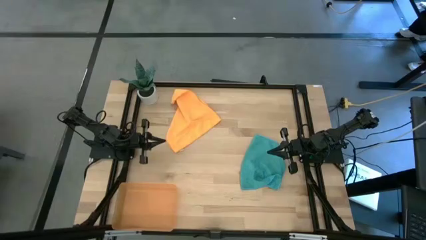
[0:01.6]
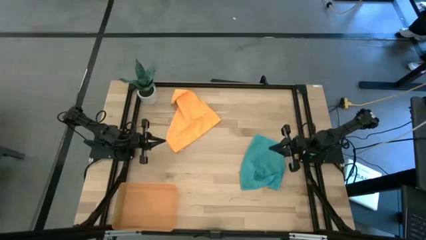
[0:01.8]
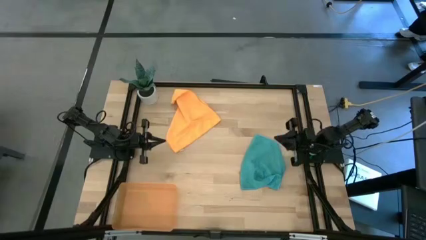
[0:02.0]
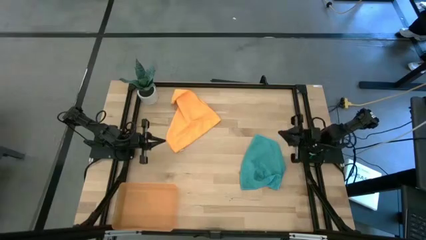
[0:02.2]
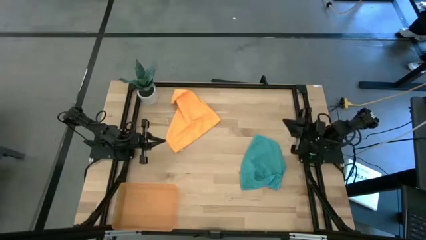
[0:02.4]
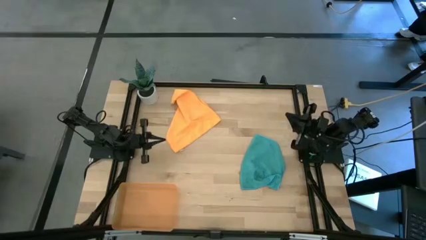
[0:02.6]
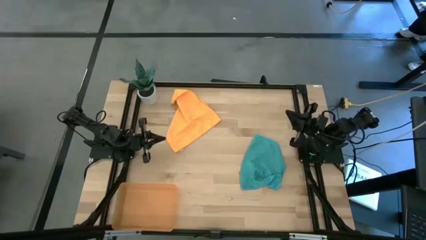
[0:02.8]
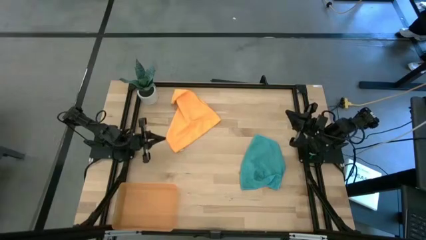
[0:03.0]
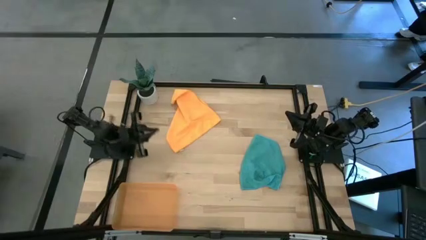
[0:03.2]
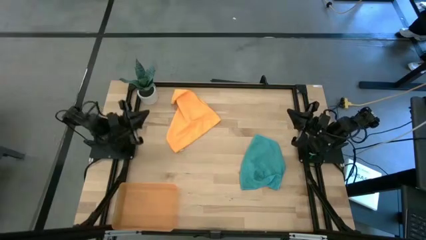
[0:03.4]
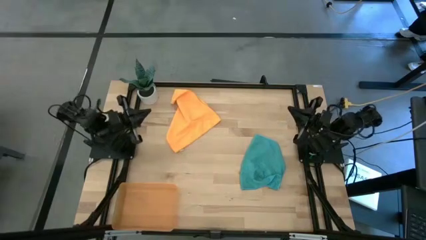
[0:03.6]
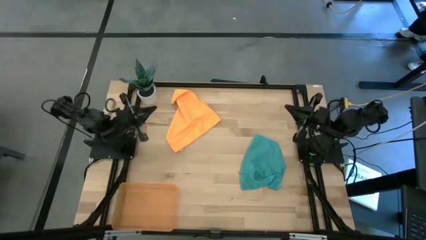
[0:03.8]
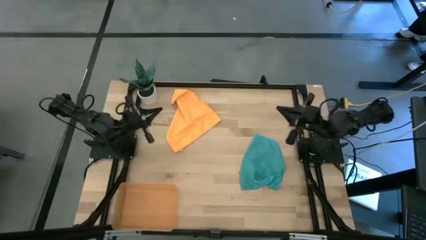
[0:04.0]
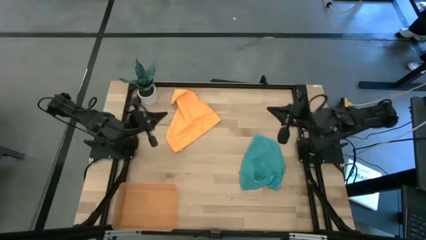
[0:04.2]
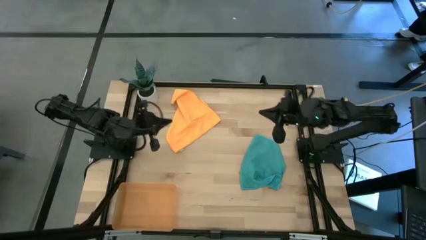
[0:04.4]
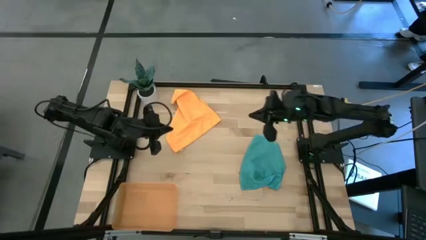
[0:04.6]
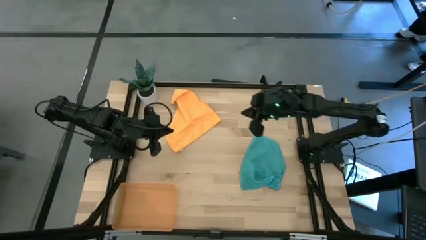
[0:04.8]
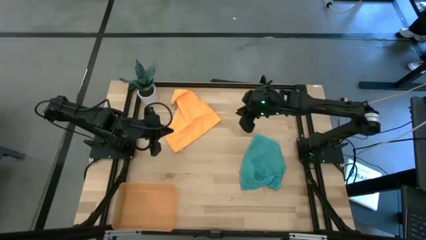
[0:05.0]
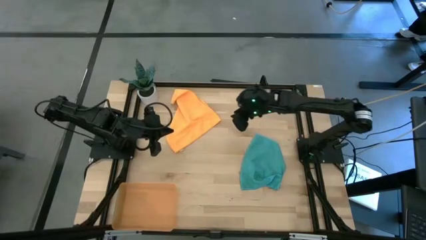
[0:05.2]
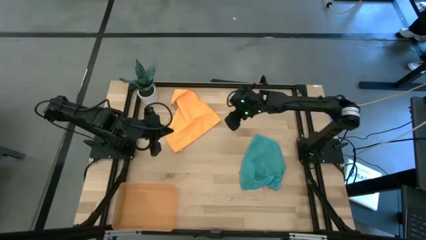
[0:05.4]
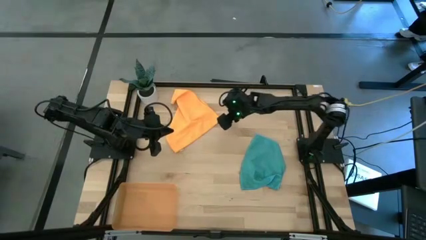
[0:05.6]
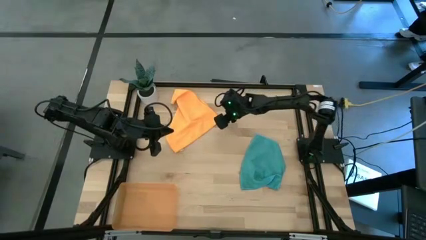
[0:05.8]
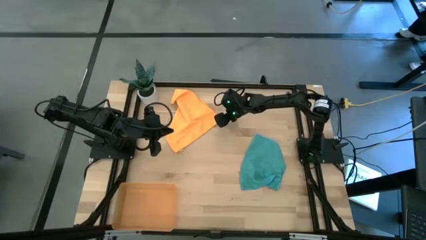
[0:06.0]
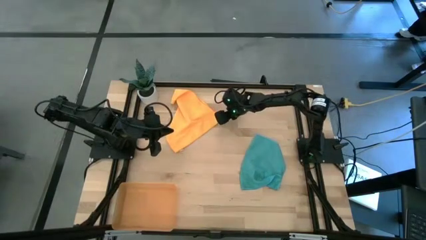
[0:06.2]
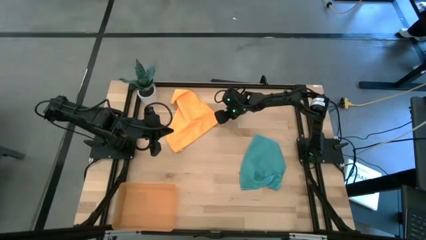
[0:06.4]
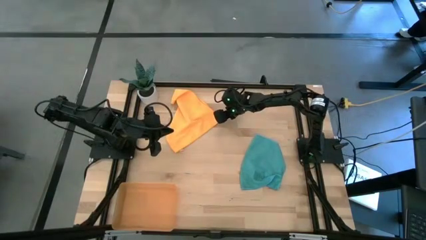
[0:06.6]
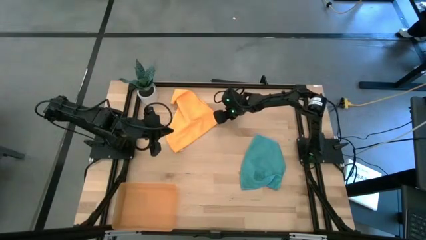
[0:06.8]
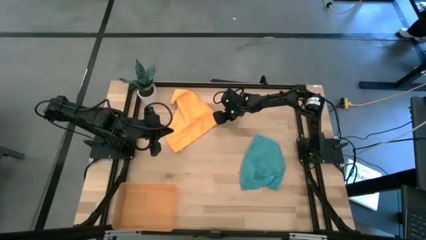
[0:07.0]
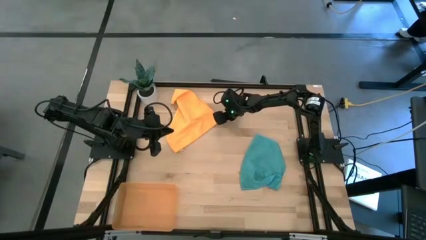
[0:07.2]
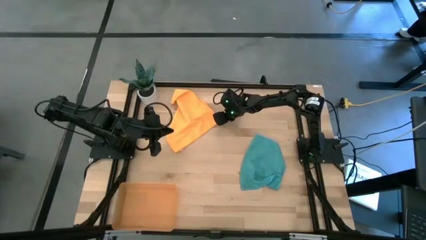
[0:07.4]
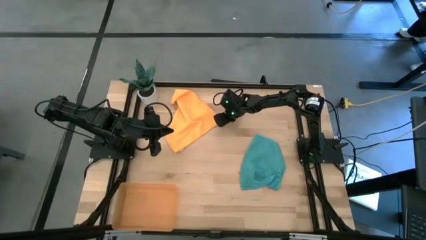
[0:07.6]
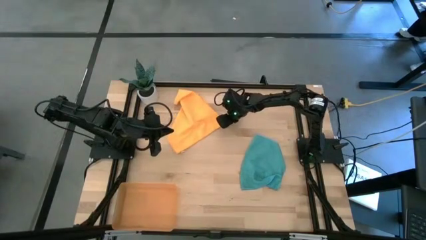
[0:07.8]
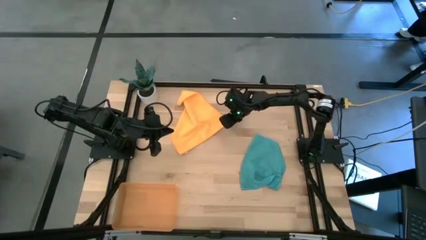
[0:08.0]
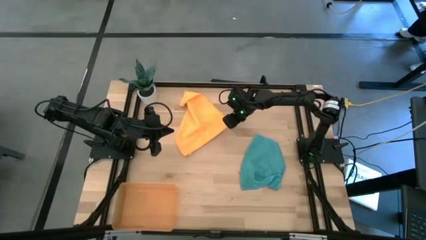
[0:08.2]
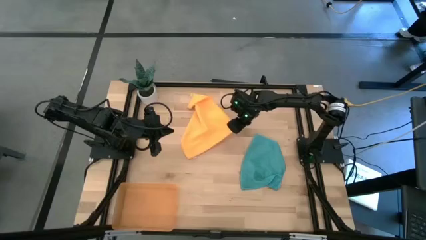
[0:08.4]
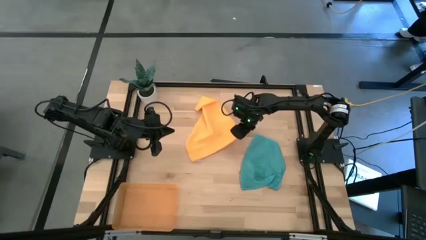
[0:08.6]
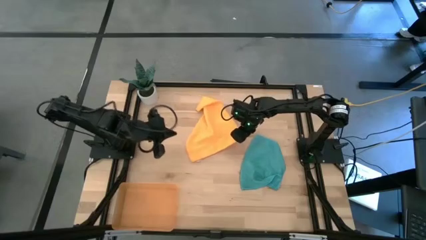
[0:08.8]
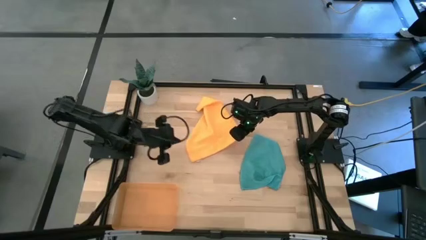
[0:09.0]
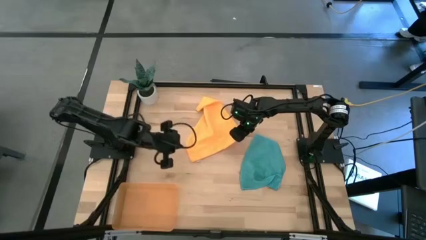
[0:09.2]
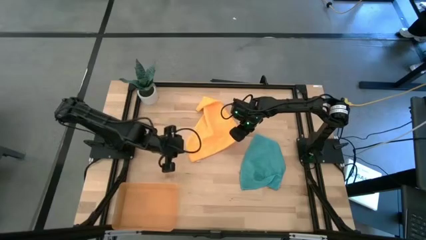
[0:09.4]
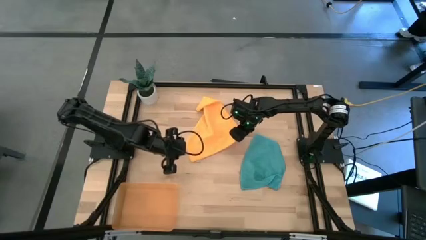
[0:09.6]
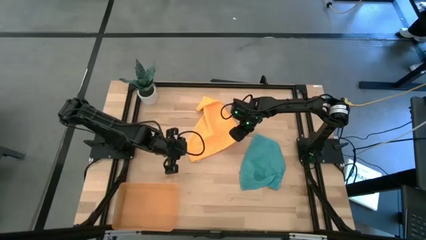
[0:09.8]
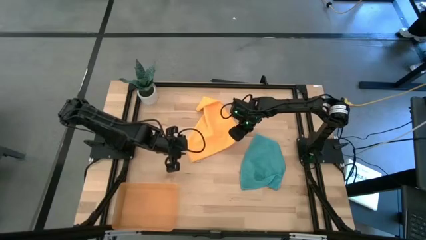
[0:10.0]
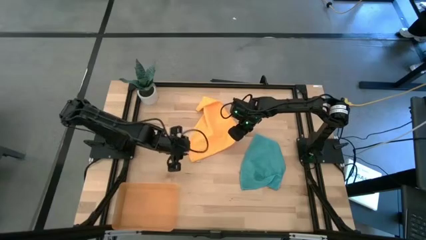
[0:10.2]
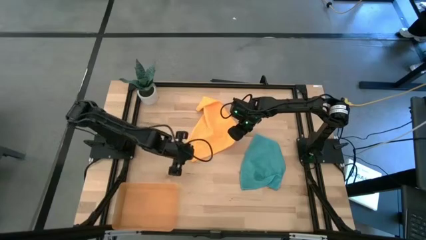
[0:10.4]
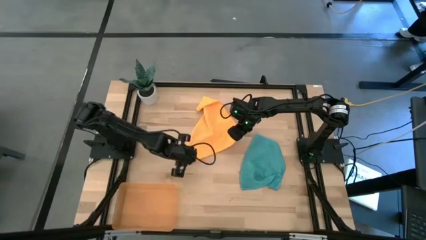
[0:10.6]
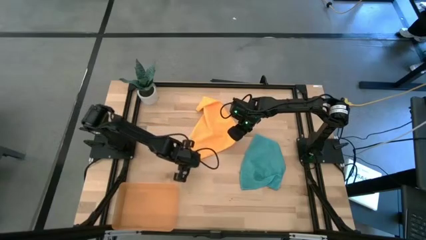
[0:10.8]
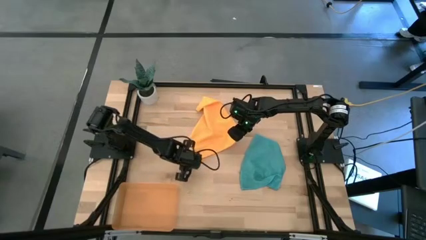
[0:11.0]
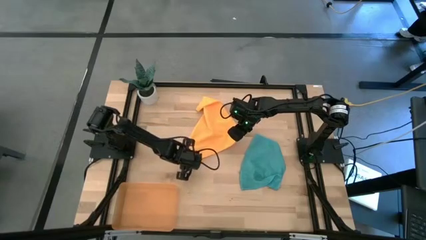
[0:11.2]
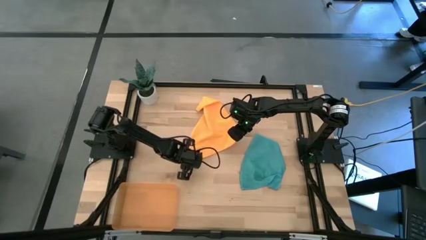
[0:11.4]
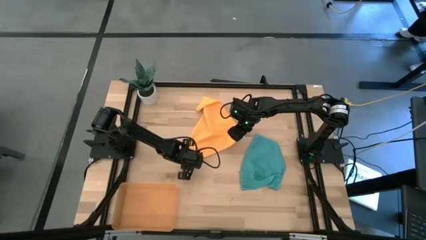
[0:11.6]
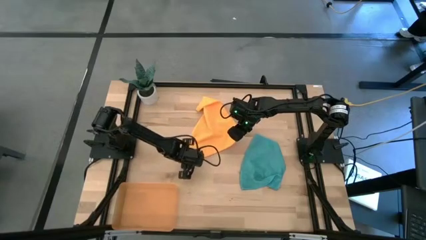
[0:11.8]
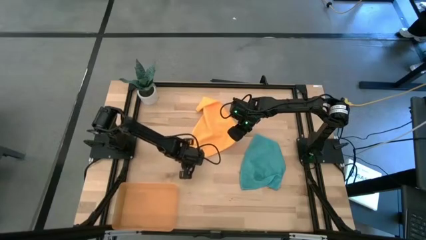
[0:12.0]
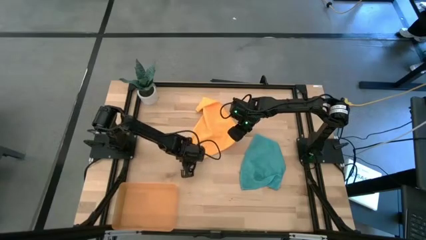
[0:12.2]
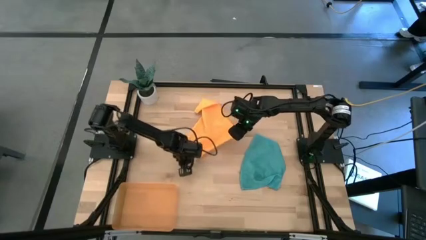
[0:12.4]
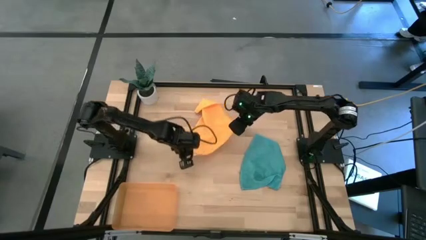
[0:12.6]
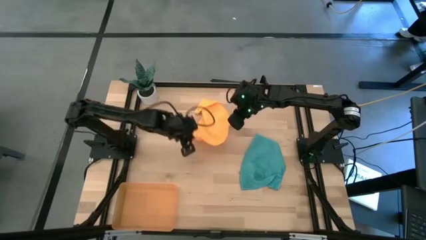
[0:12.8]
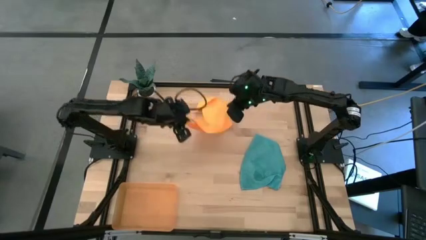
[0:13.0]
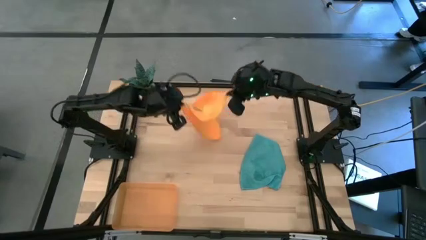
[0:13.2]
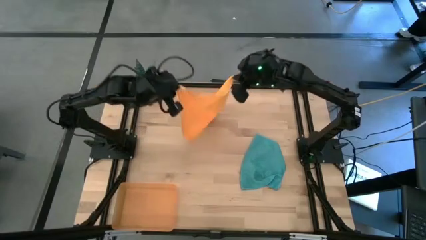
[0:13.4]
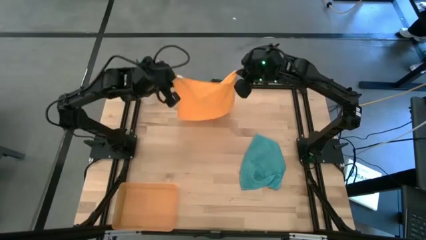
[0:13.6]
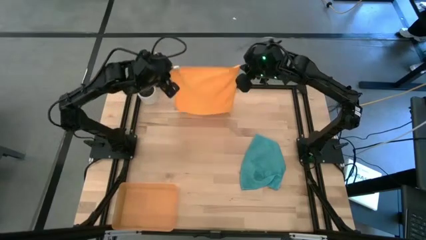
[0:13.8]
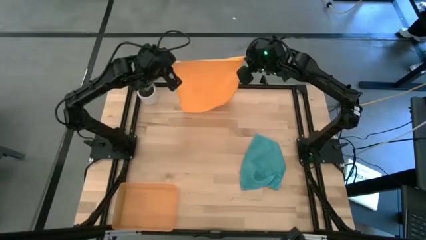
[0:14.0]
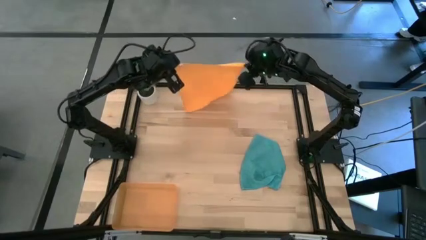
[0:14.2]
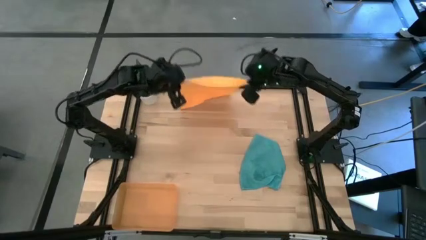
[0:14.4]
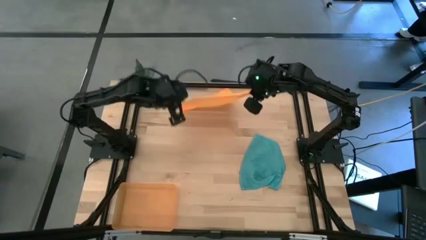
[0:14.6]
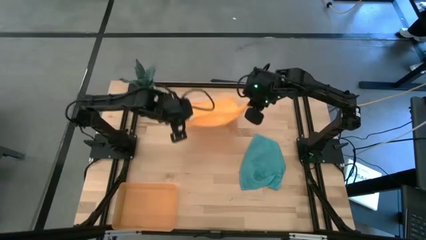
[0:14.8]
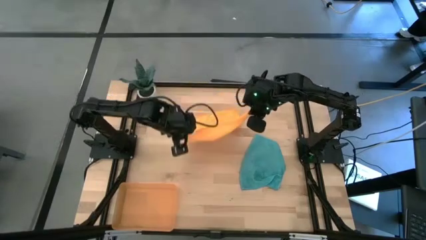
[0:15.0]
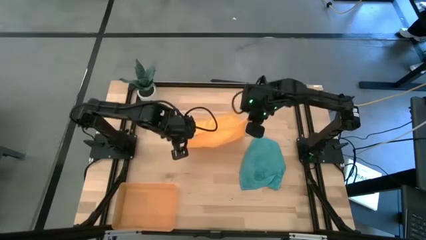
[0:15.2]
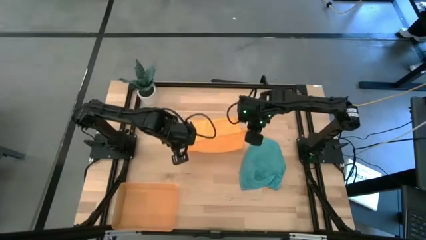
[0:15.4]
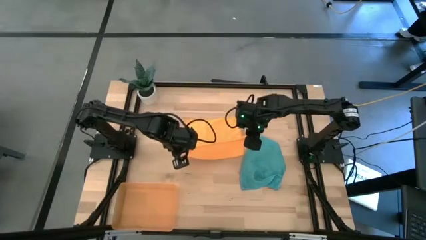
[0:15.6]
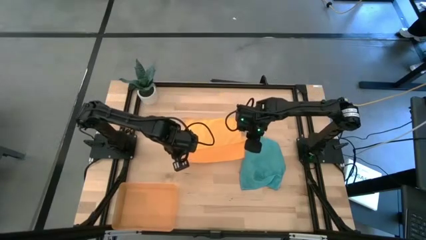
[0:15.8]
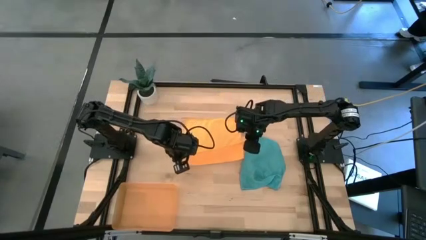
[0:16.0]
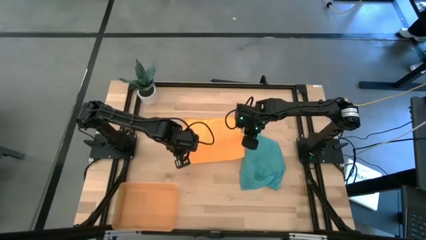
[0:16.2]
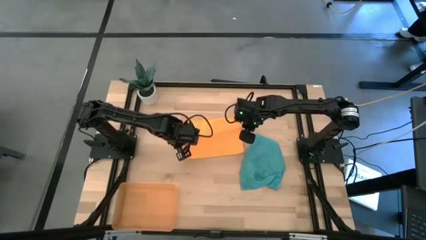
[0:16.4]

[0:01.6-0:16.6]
Task: Roll microfiber towels into tight, uniform cylinder then place into a basket
Roll the orange microfiber towel
